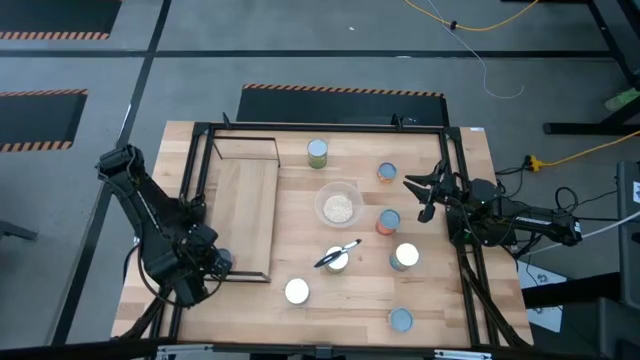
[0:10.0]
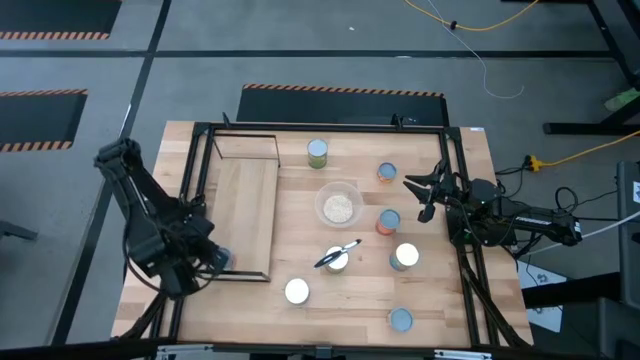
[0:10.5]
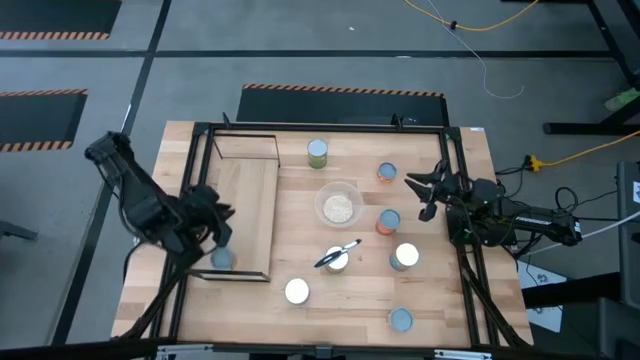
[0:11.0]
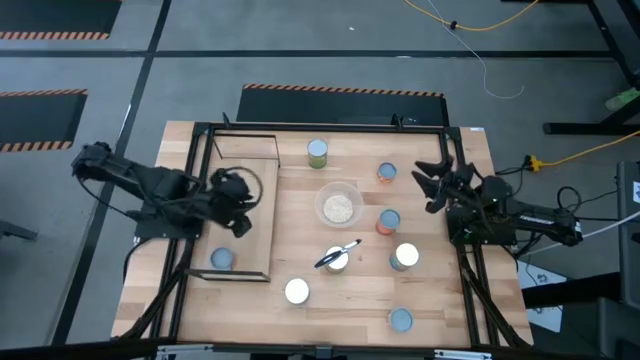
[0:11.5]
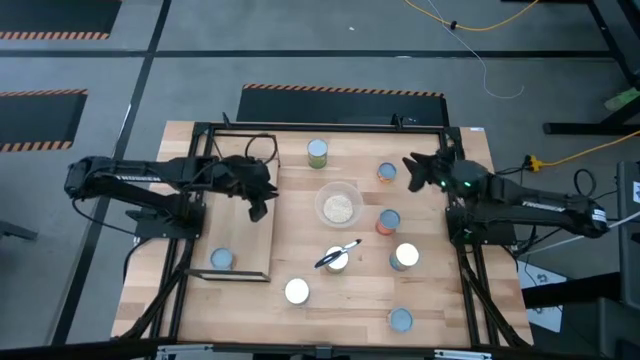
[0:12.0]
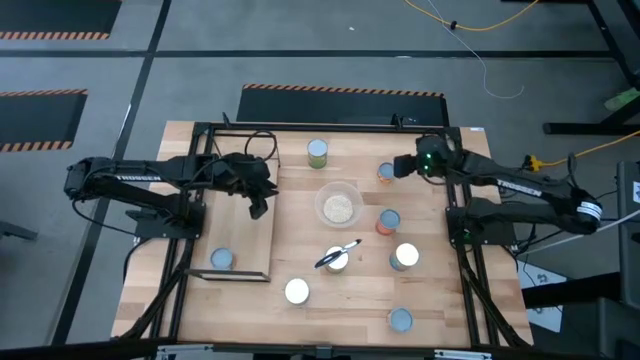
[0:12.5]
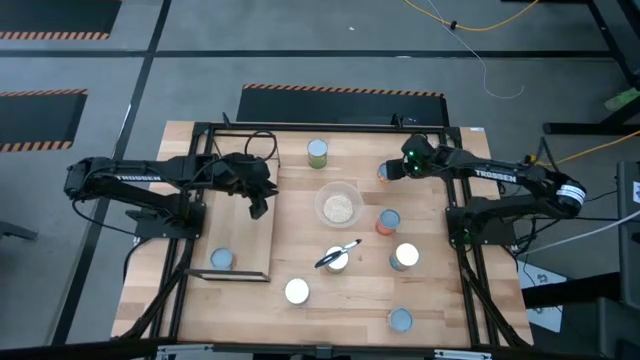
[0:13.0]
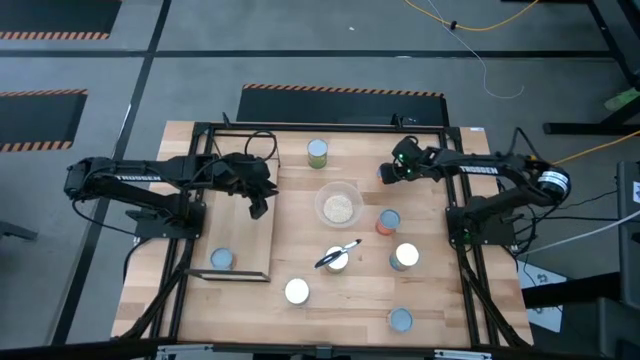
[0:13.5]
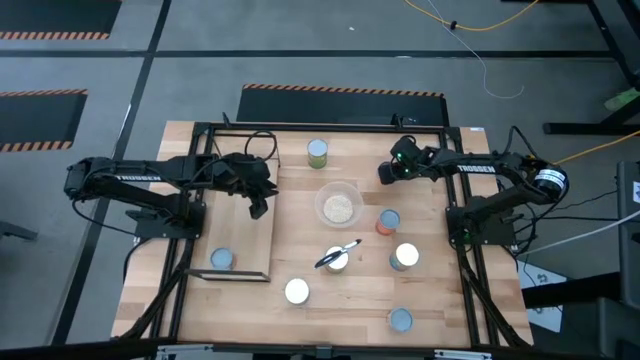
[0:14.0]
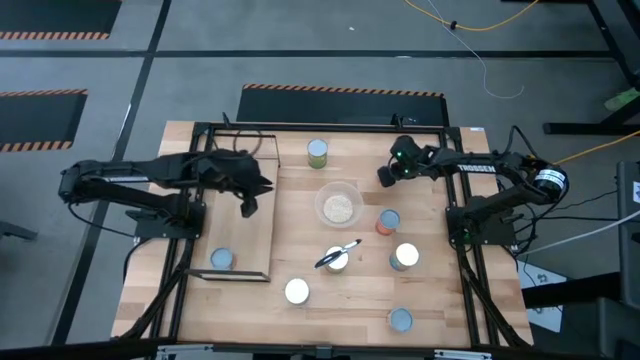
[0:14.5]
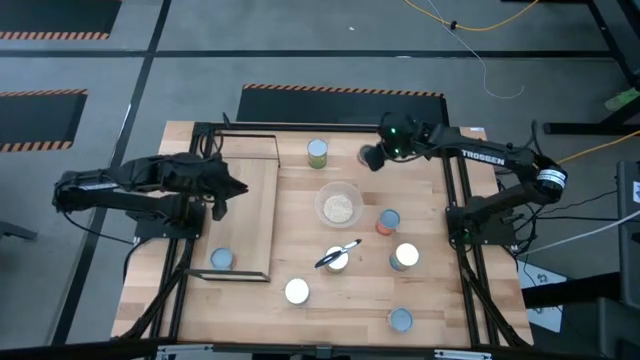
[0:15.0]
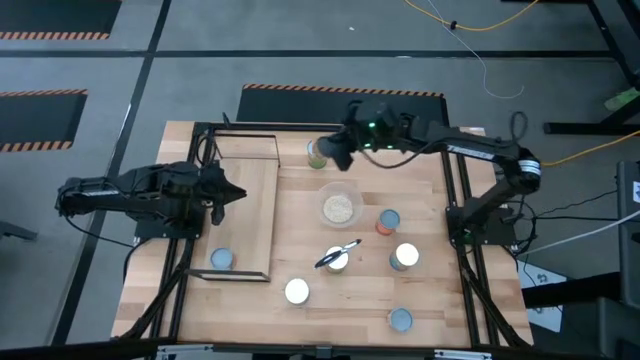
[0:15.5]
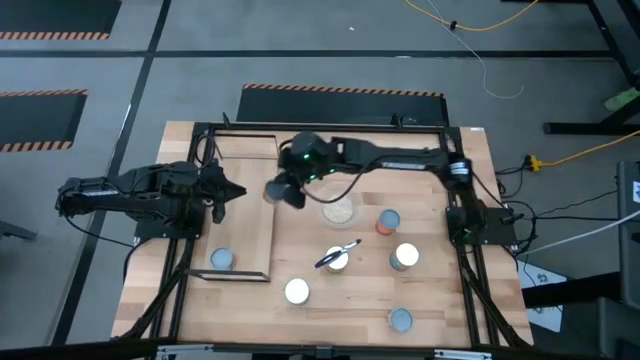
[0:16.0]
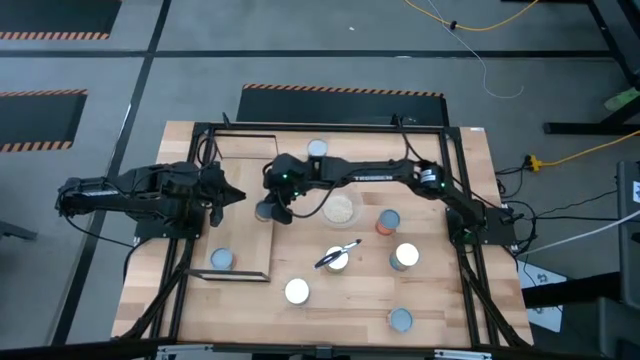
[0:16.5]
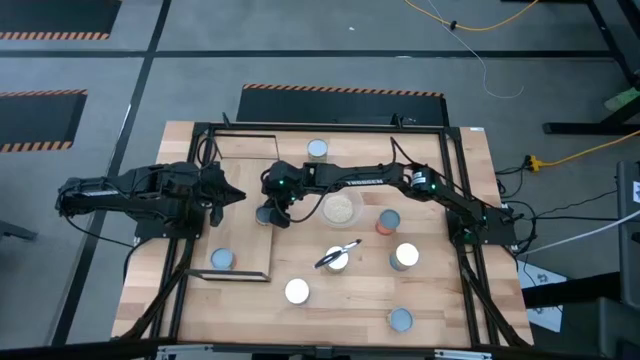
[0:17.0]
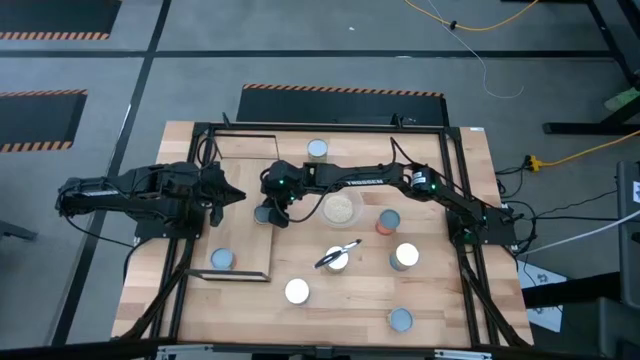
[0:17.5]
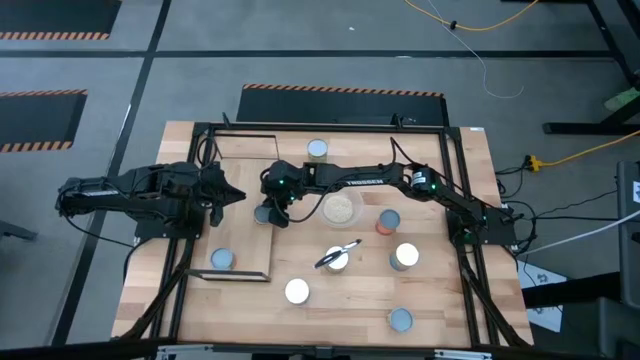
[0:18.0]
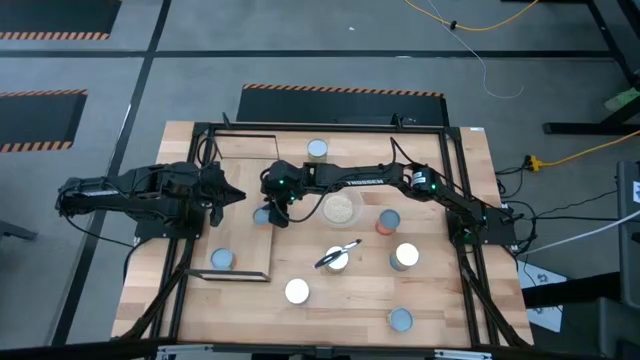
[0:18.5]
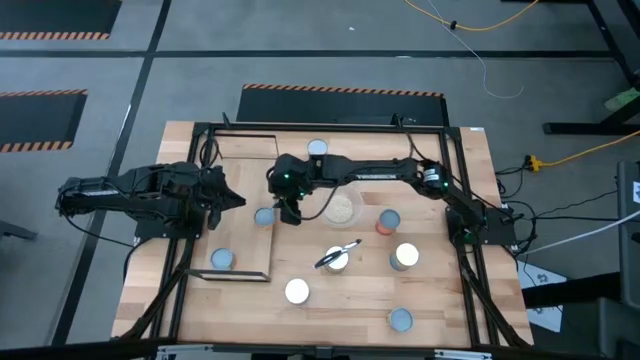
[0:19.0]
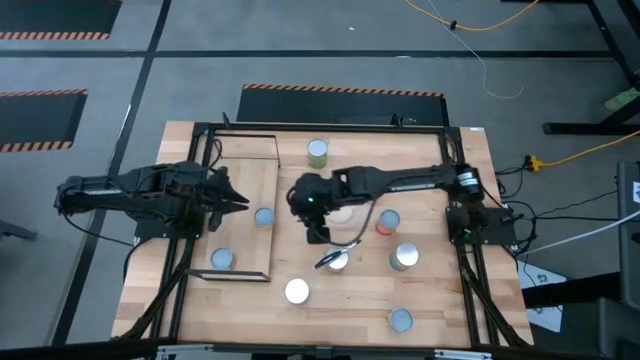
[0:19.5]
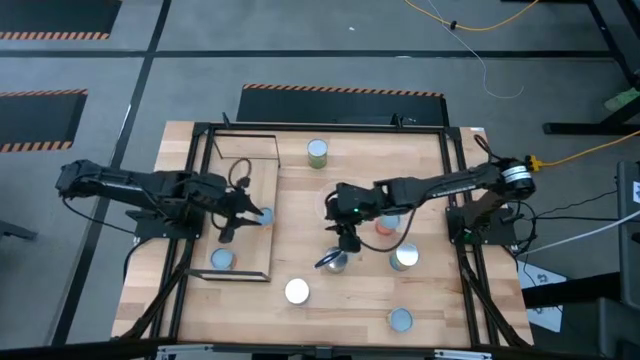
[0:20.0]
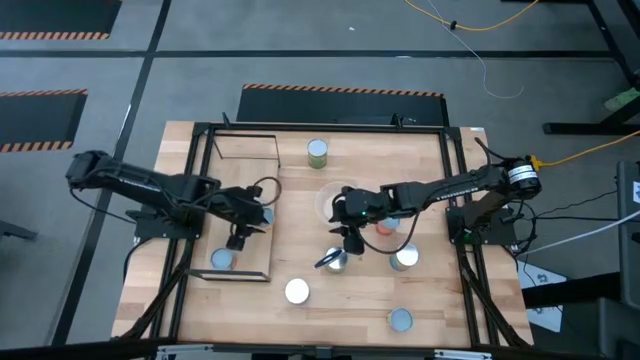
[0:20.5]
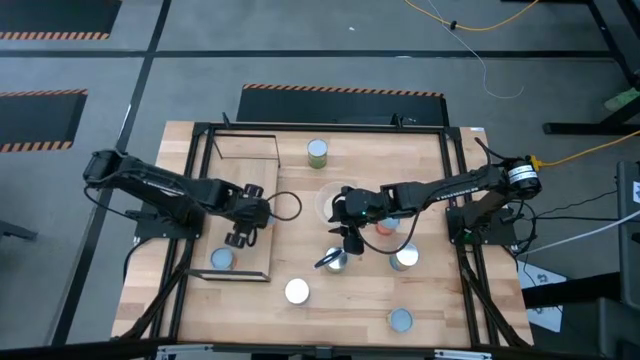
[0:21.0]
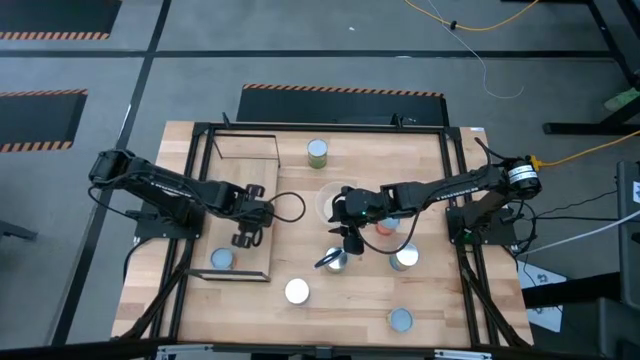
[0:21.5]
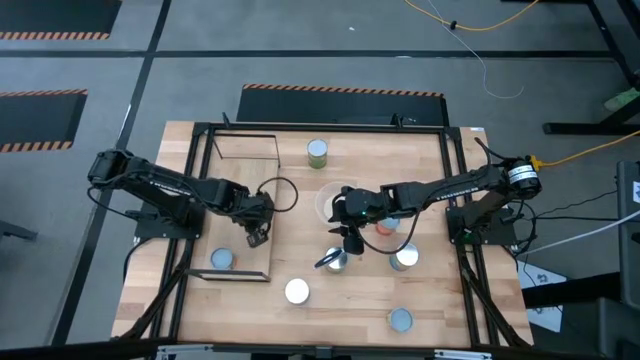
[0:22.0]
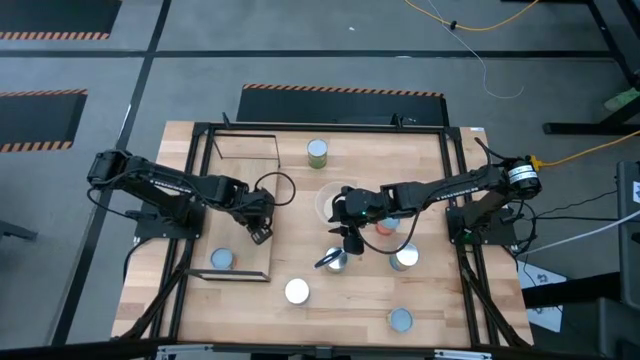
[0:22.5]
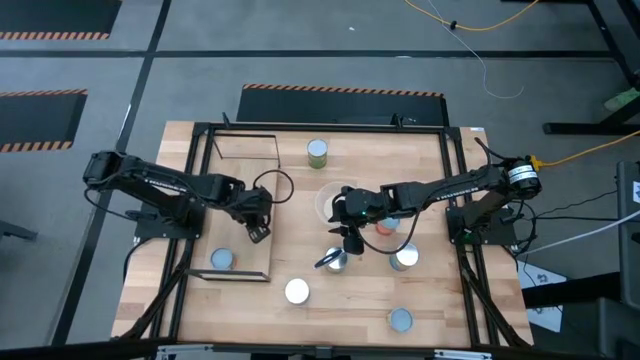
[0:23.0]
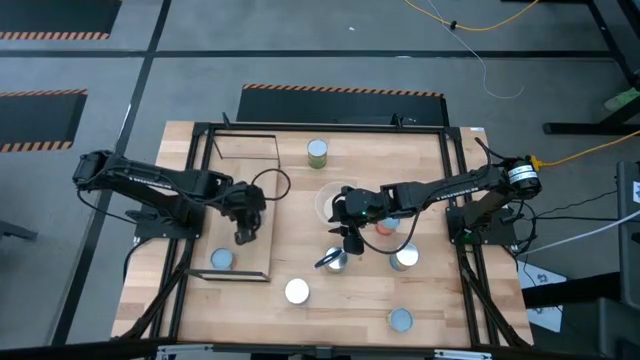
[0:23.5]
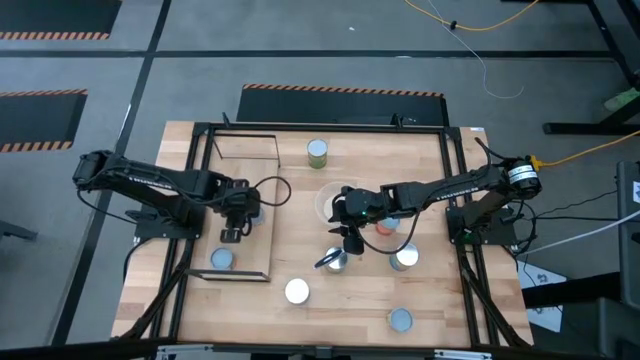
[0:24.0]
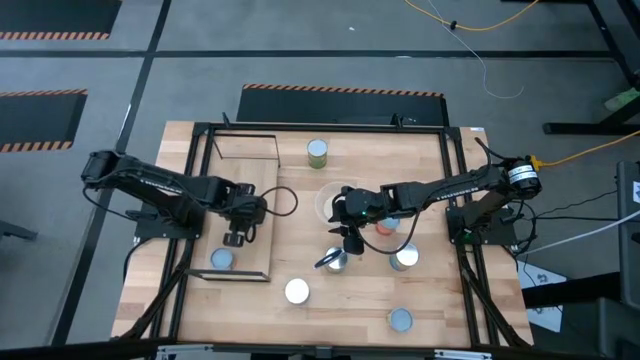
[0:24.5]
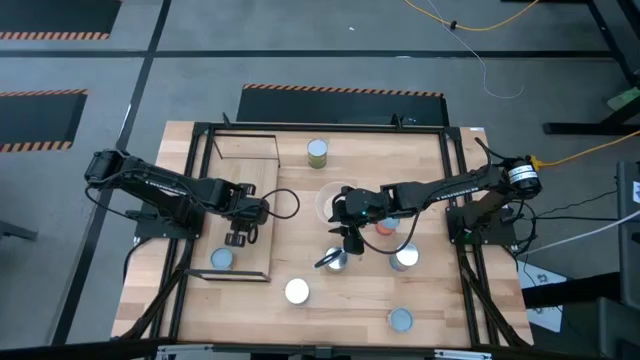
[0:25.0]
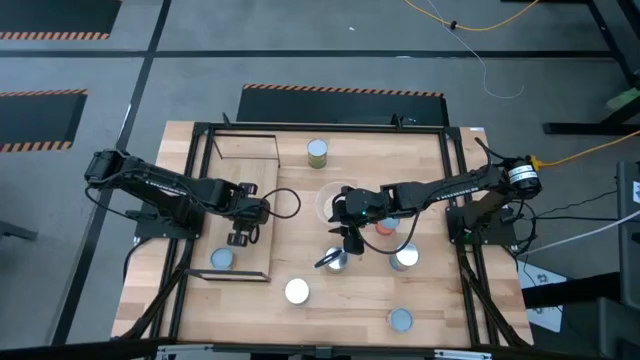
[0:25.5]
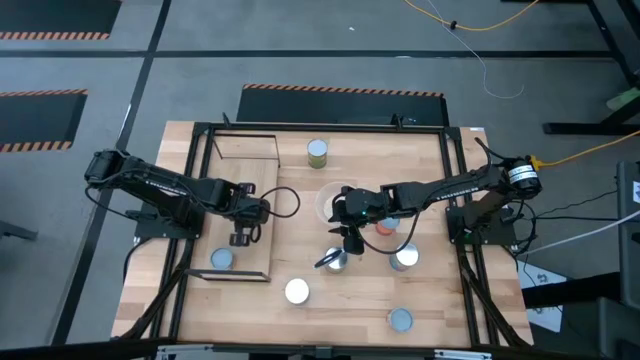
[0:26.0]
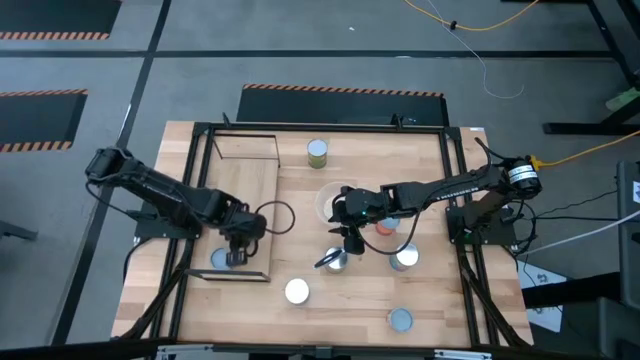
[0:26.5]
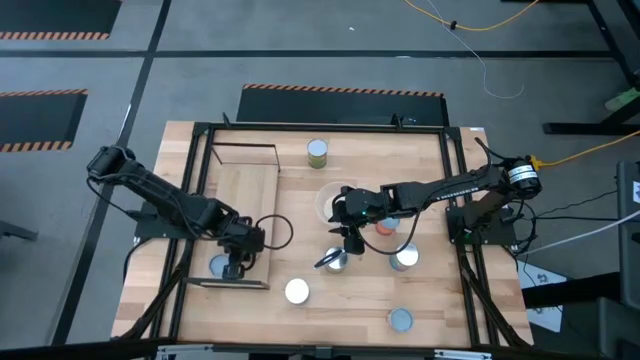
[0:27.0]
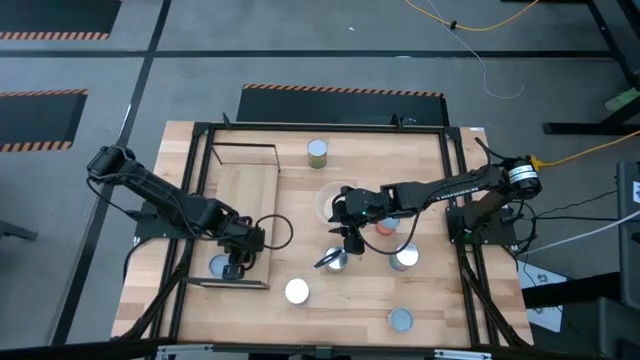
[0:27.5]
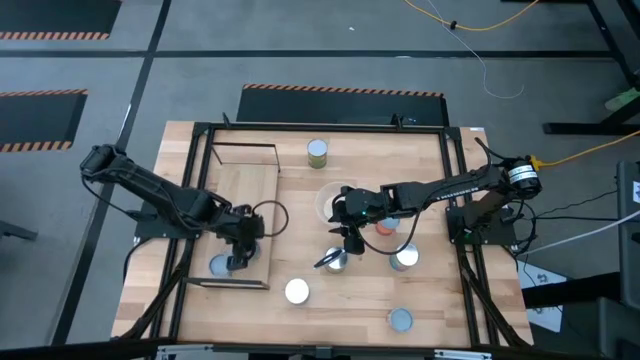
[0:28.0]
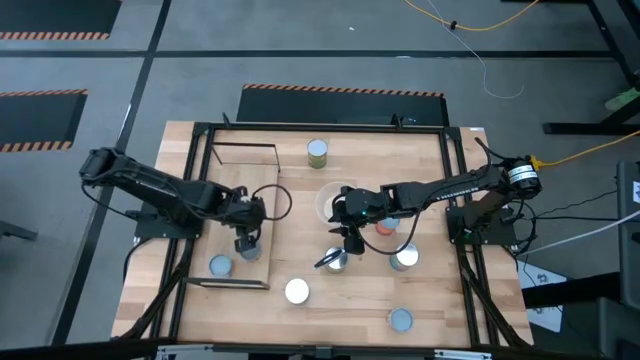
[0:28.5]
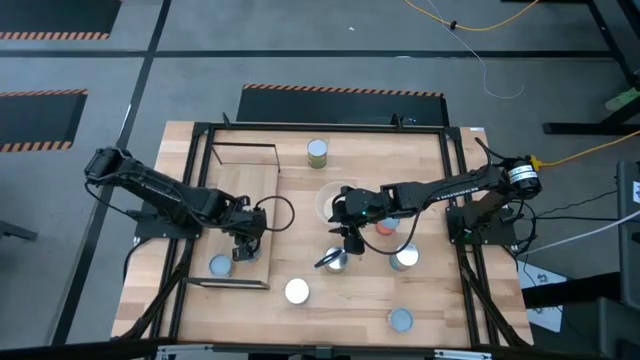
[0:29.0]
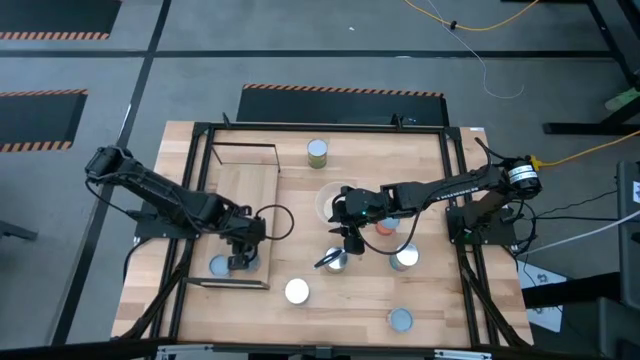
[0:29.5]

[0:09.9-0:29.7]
Task: Pick and place cans onto a shelf
Put the canned apple on the shelf
